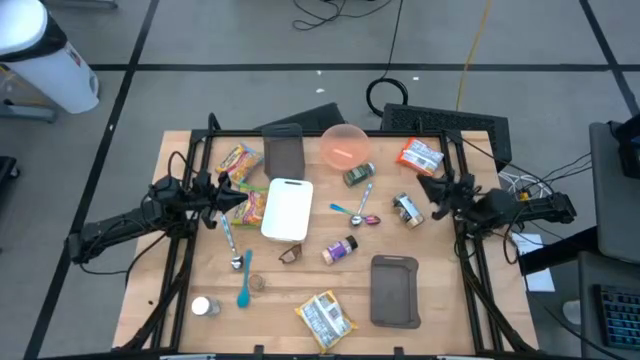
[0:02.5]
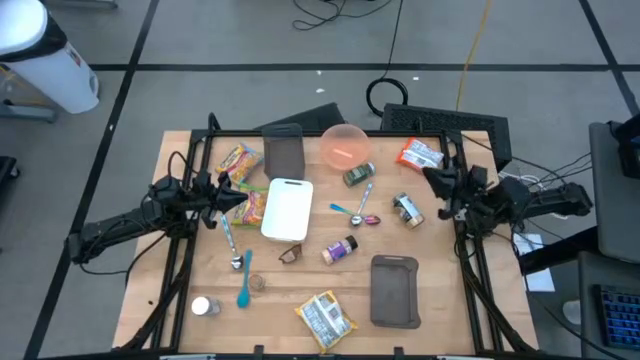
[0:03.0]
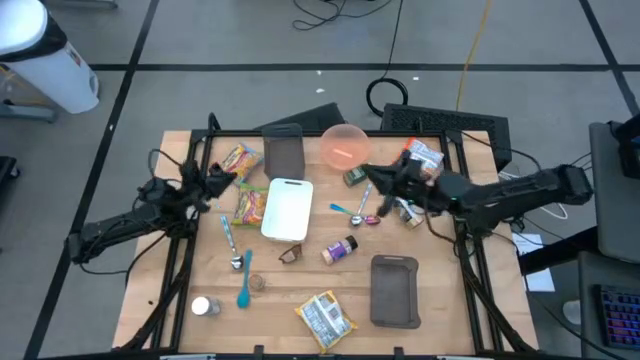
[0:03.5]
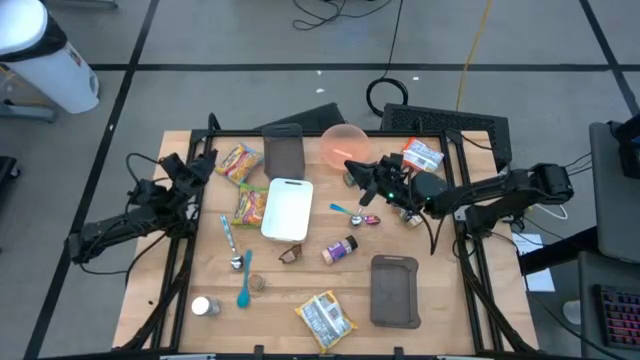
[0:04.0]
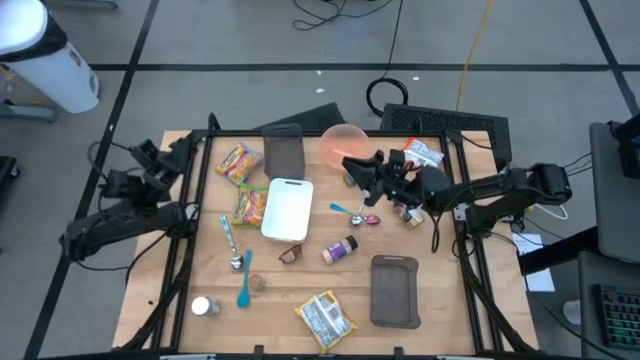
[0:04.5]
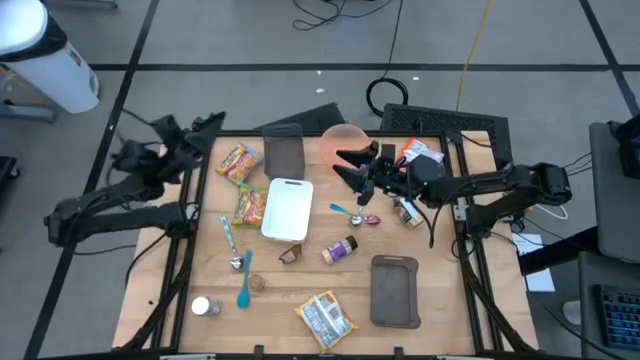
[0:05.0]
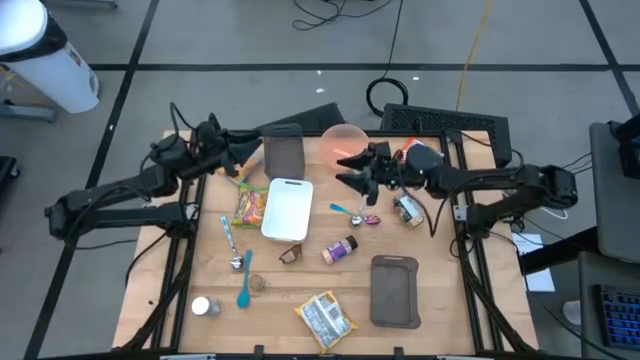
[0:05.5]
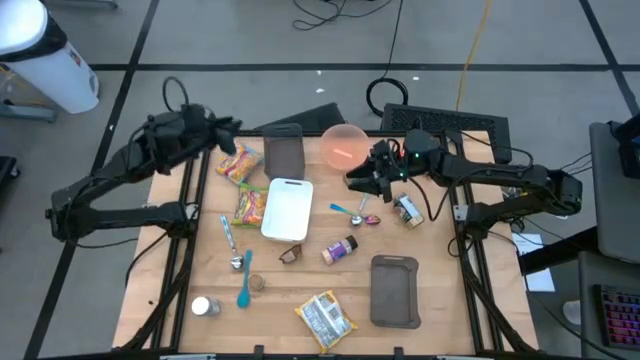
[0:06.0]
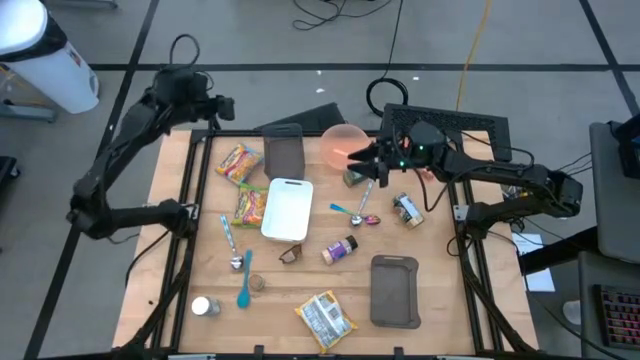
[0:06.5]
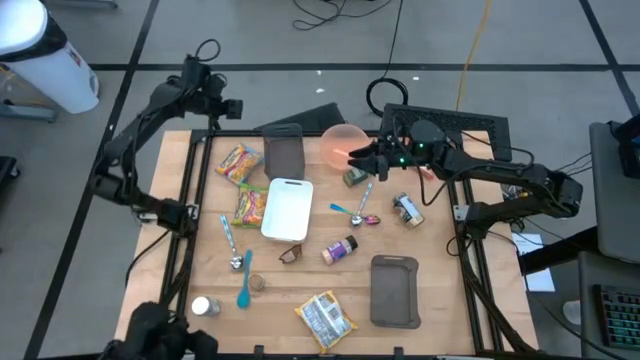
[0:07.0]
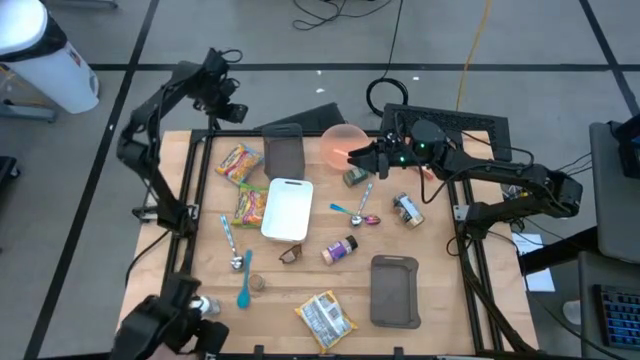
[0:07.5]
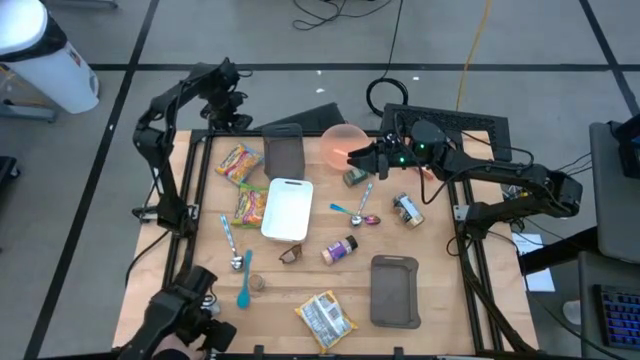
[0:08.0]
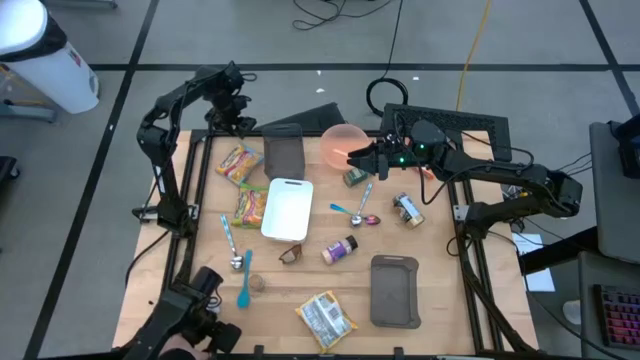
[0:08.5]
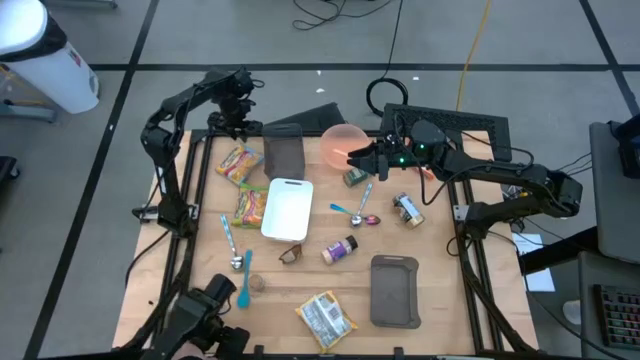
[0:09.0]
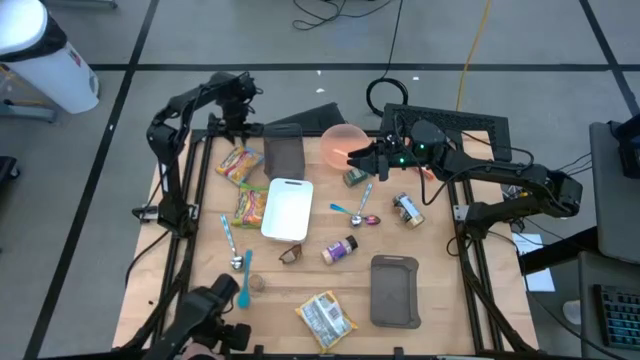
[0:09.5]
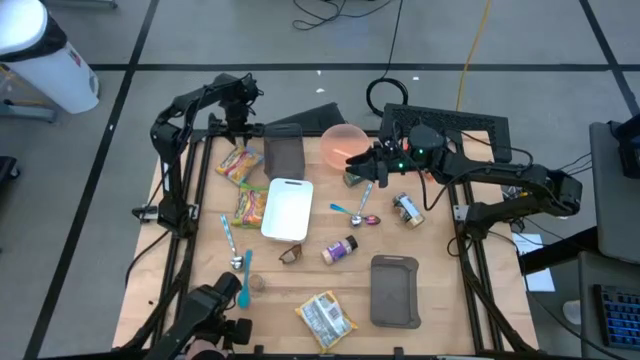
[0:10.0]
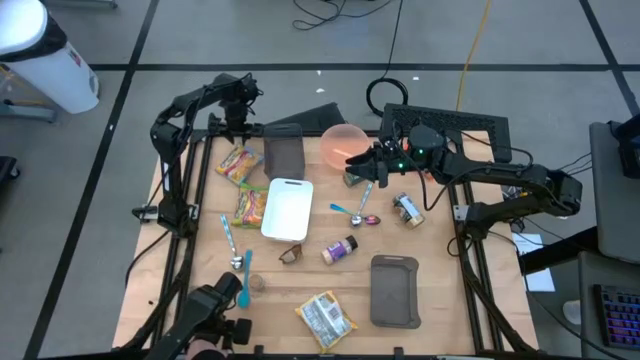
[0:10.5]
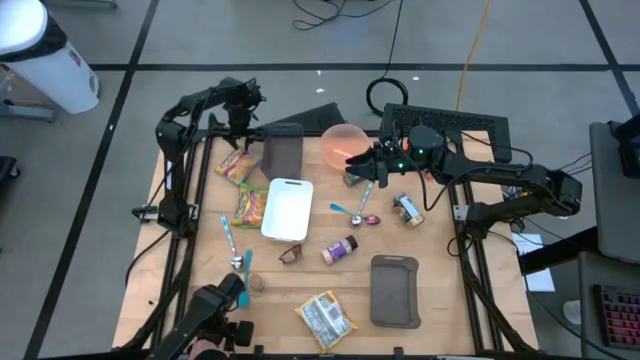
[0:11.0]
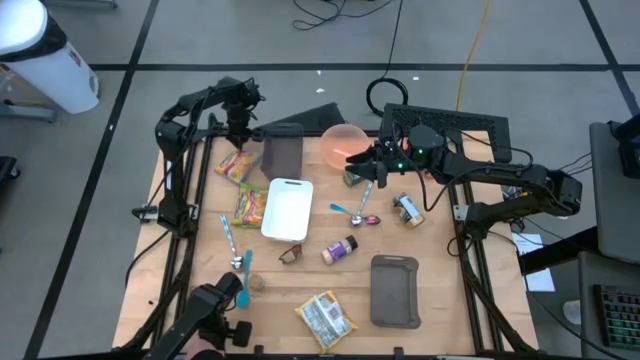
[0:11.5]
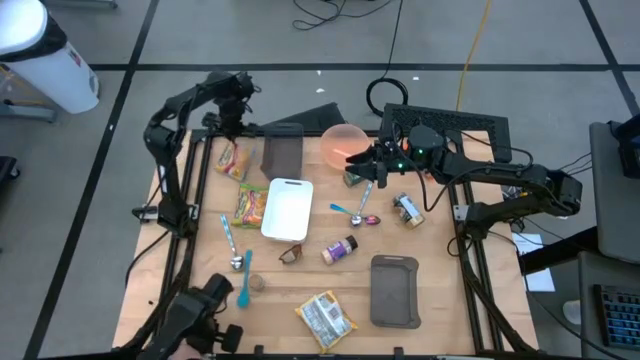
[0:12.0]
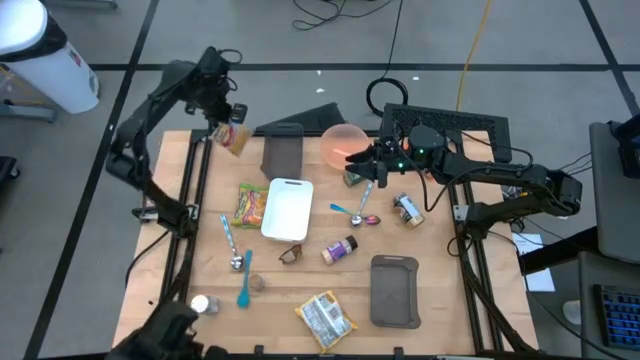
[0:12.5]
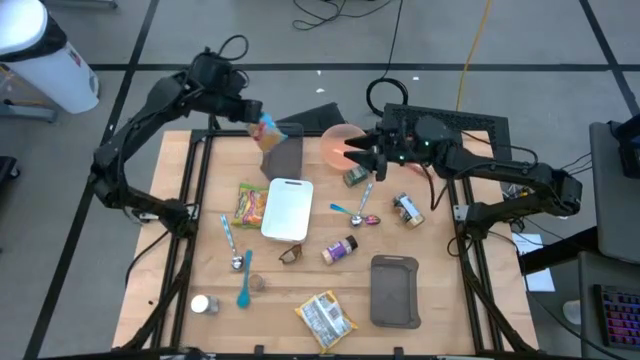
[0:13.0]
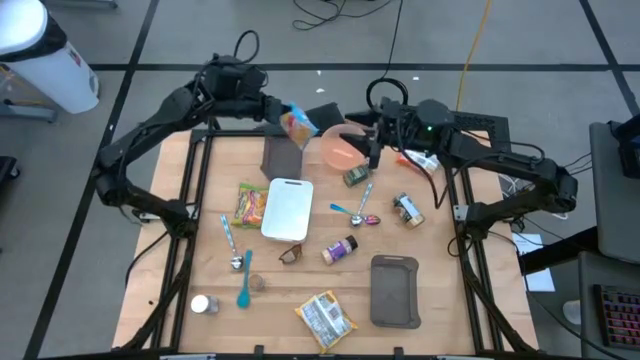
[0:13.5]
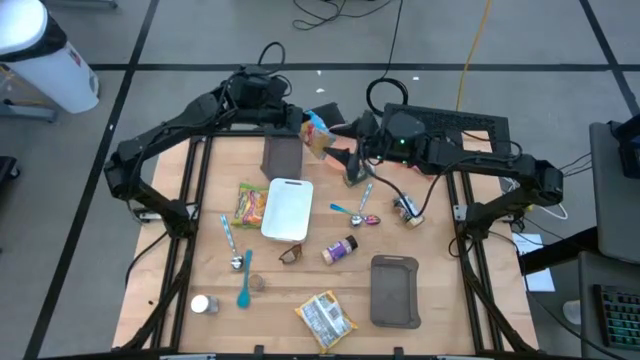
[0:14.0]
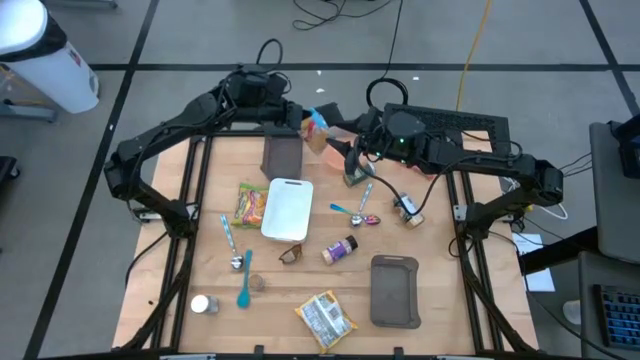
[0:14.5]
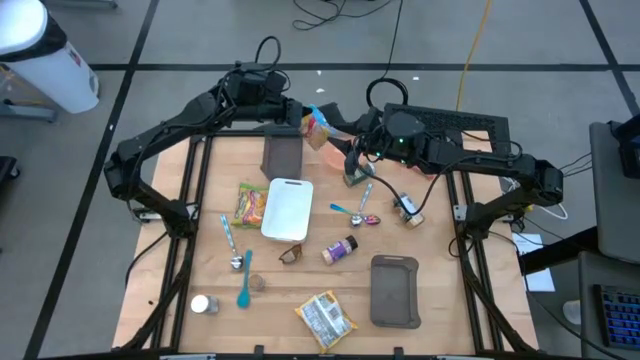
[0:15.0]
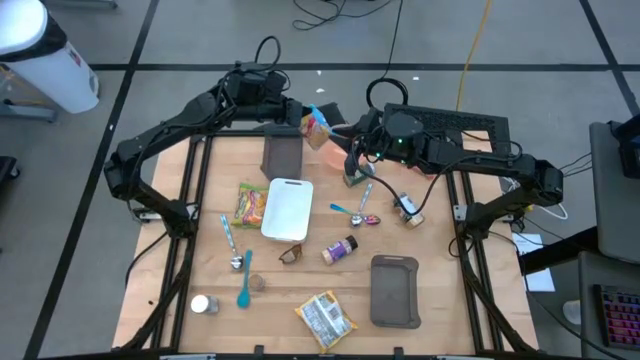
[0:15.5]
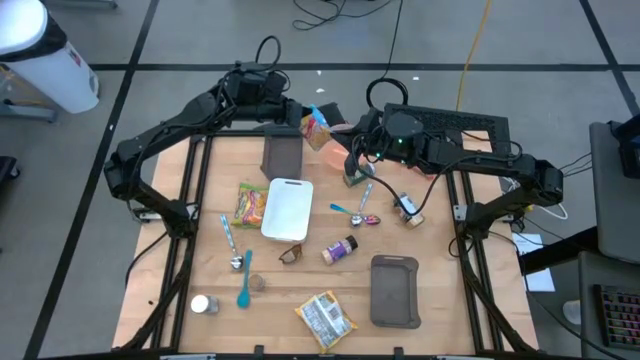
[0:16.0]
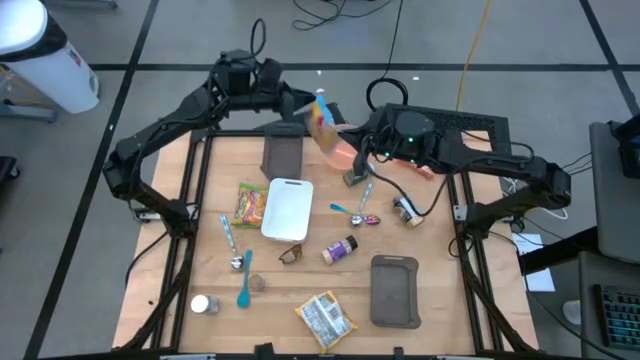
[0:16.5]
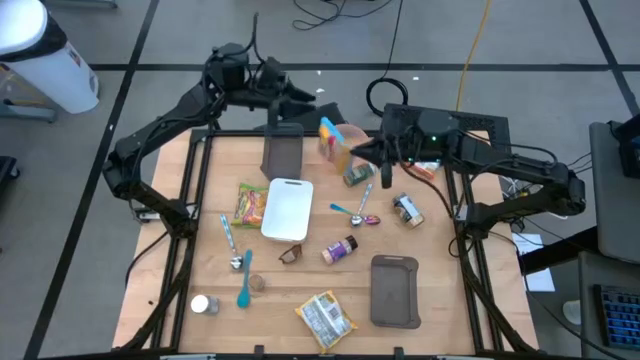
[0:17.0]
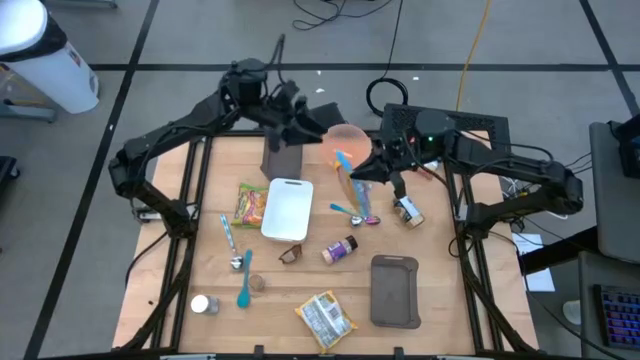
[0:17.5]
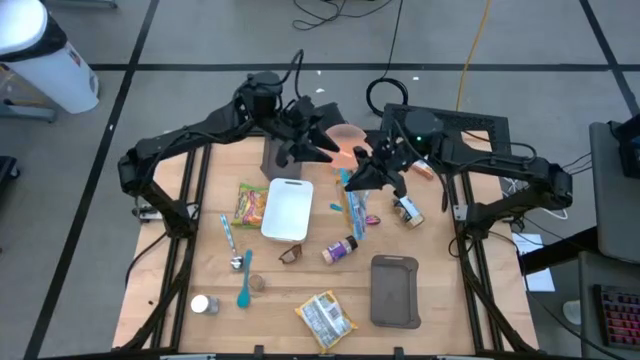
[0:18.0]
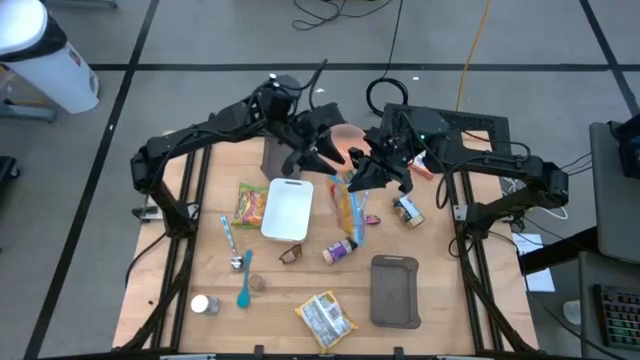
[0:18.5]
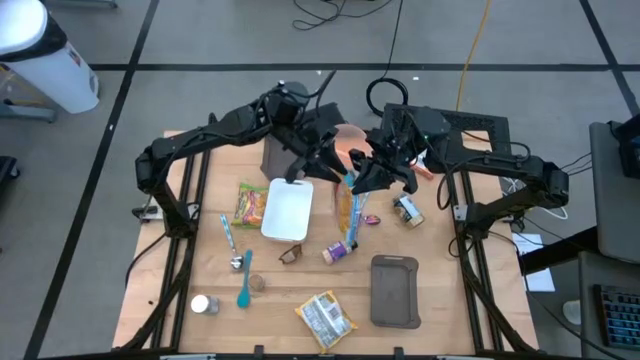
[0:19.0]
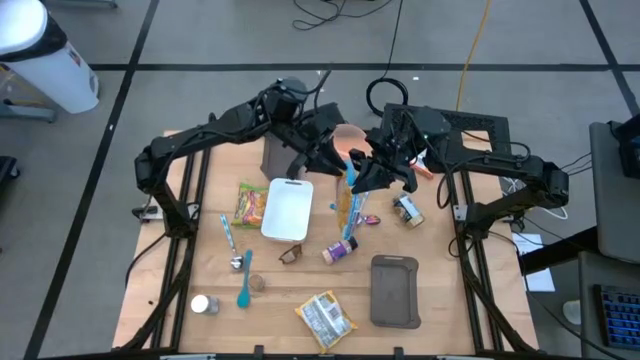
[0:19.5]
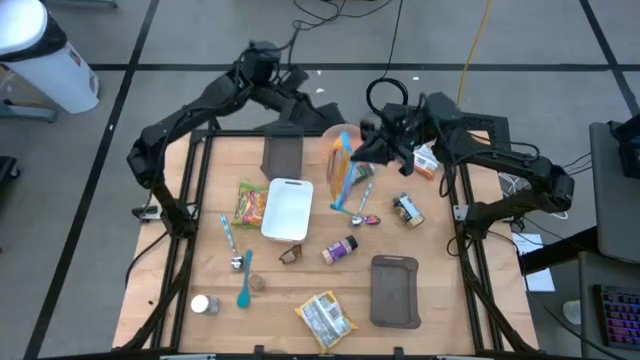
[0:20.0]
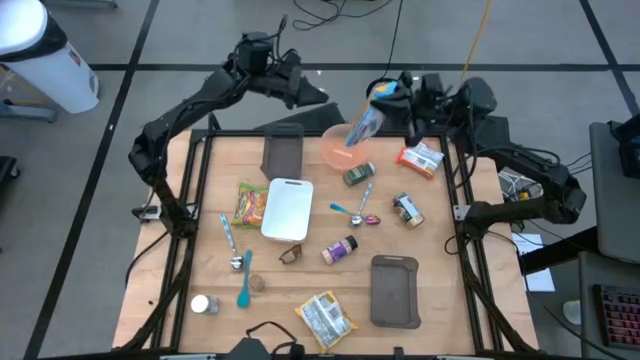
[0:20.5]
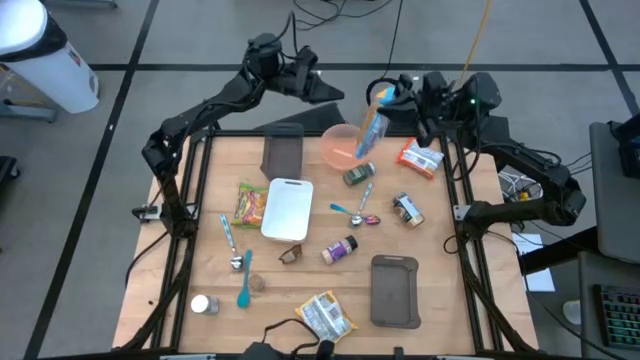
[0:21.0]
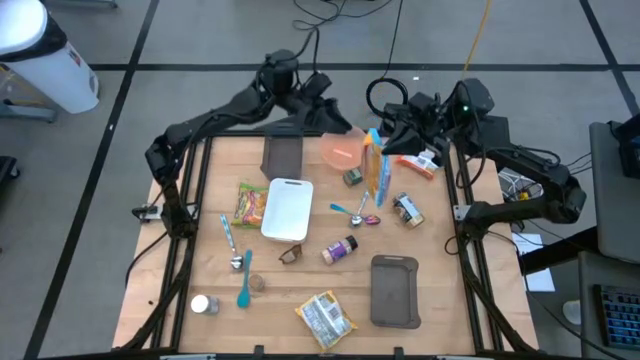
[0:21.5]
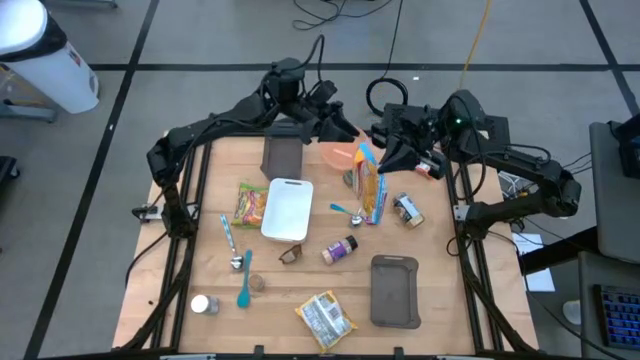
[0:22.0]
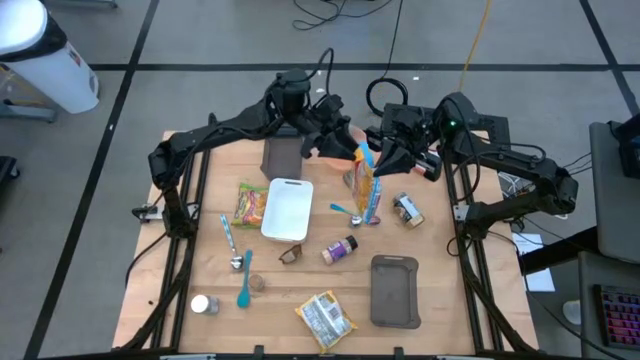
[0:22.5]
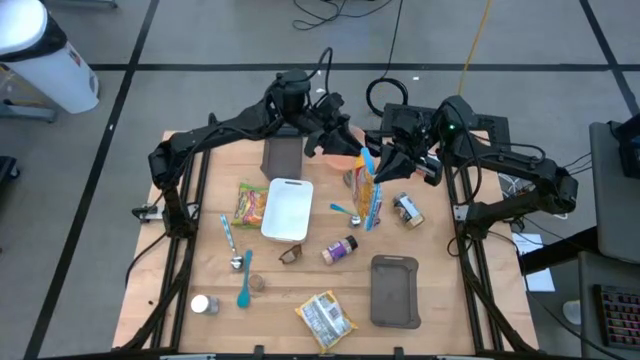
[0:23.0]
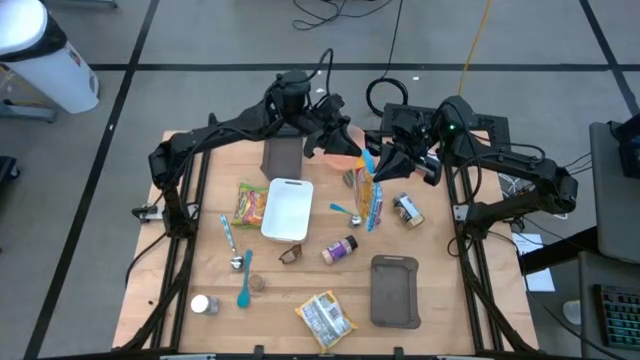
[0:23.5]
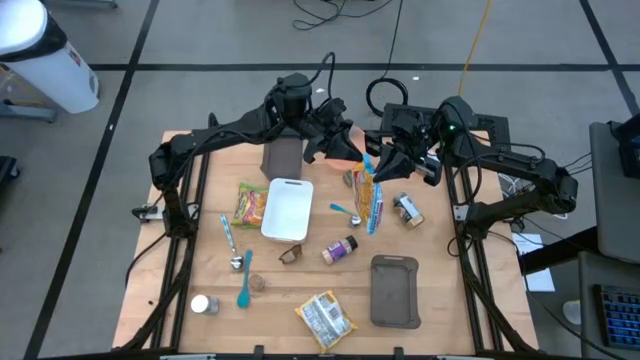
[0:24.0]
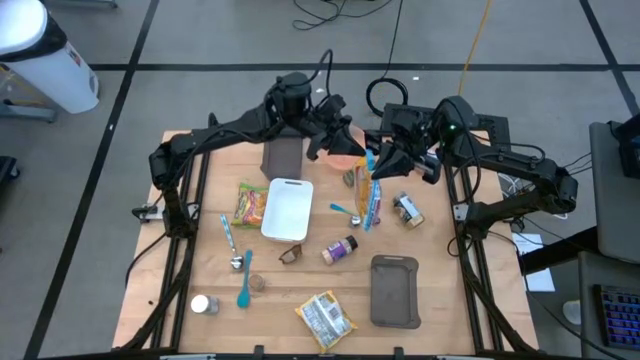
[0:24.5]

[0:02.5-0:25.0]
Task: Pick & Place Food Item
Put blue noodle pack into the bottom black transparent bin
